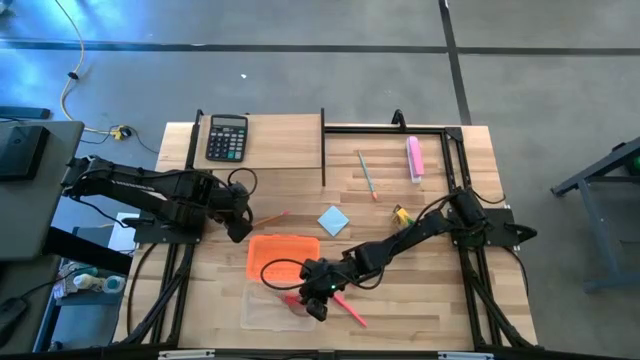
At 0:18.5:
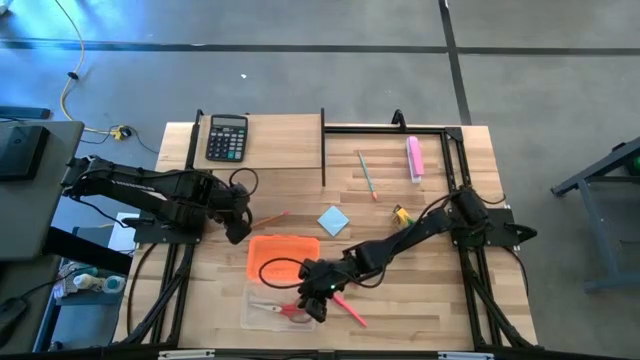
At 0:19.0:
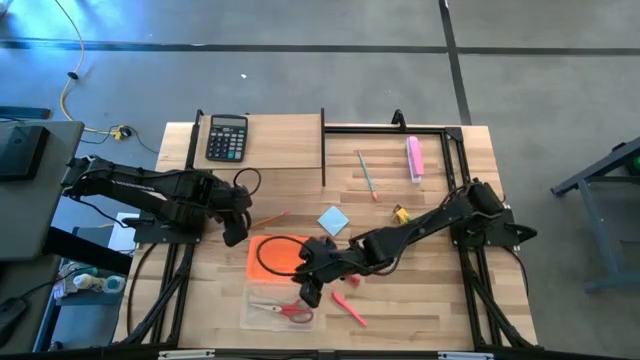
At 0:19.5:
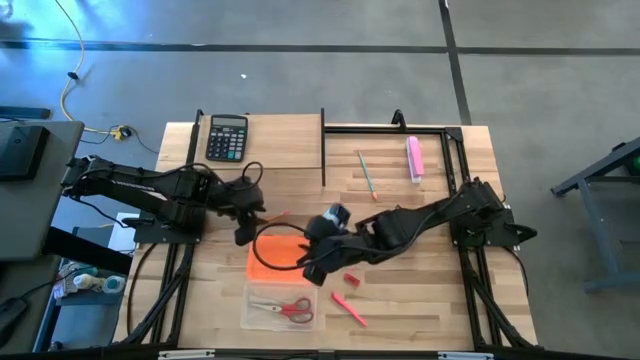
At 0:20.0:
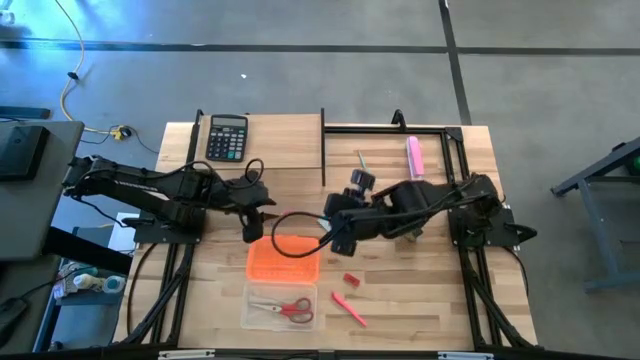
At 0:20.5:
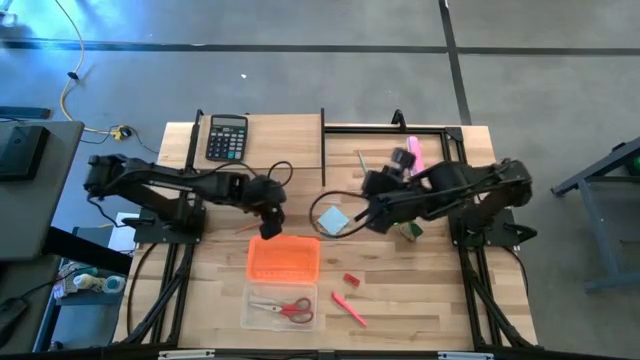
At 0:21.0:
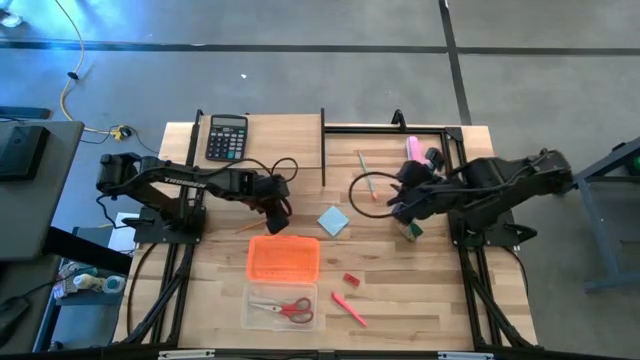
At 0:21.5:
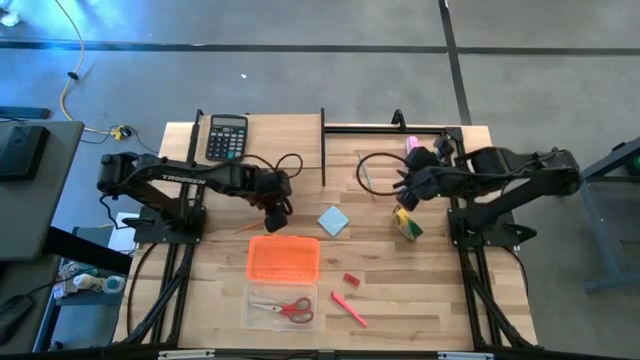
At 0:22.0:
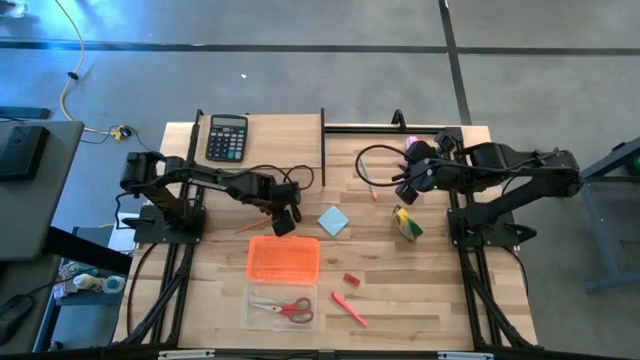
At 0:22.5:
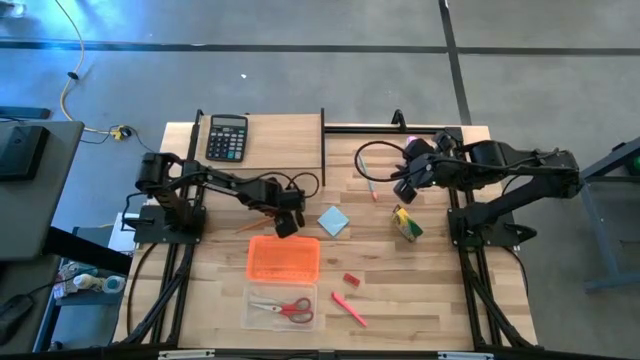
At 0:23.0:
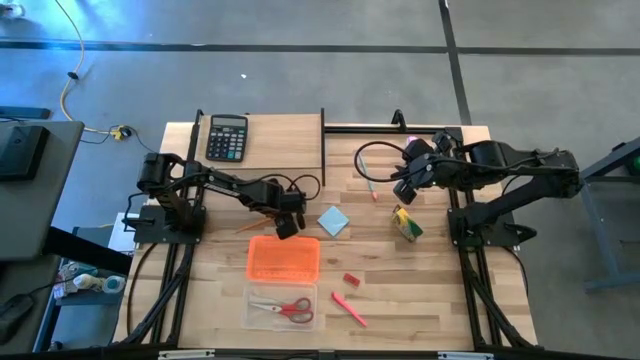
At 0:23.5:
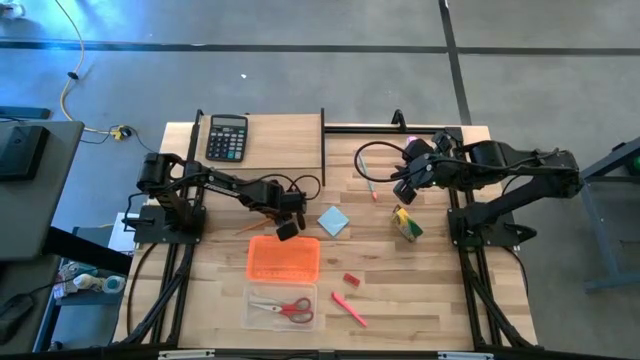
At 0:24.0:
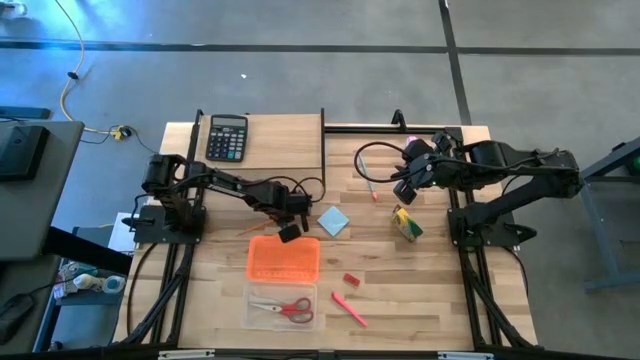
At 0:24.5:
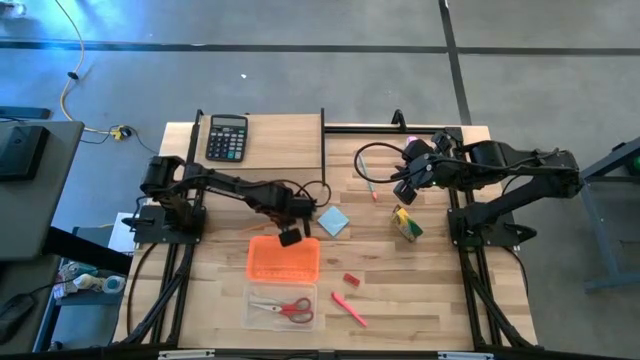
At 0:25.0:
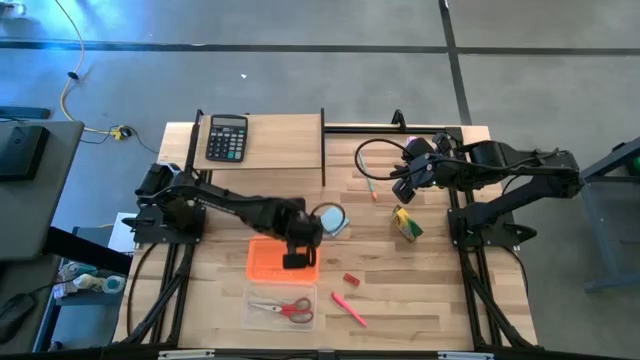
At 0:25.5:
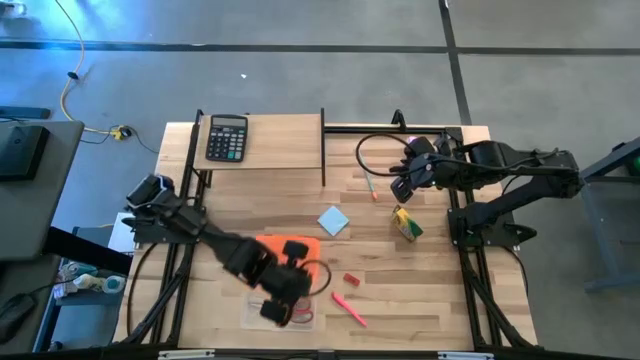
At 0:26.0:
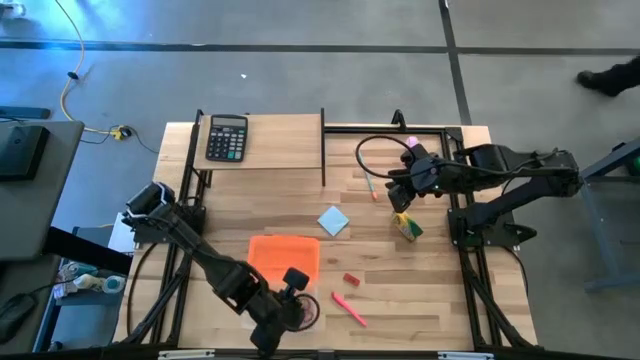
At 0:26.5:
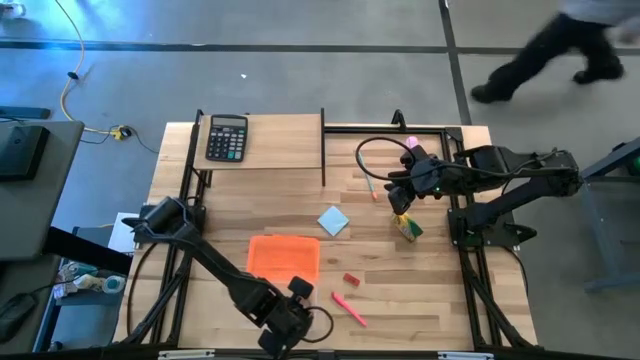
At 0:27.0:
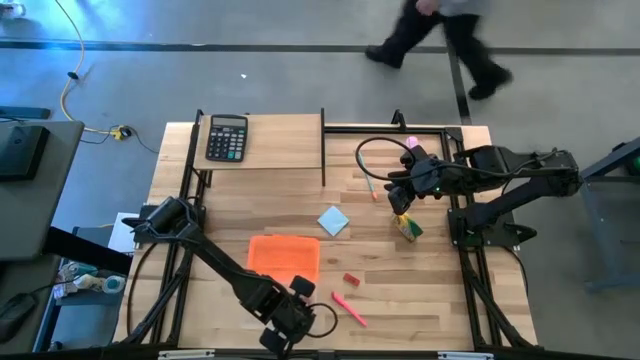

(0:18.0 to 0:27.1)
Task: Pack school essentials
Put the yellow pencil in the orange supply box

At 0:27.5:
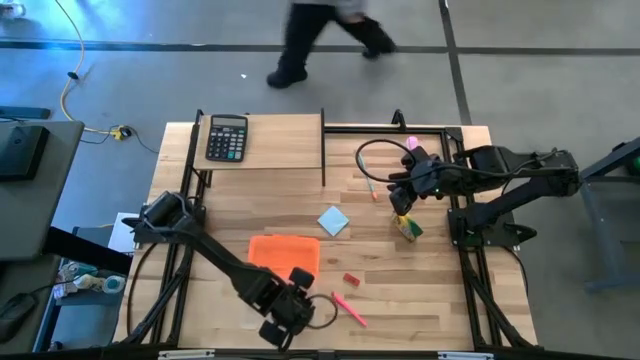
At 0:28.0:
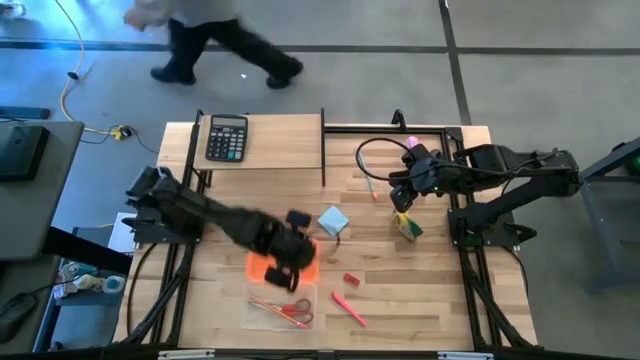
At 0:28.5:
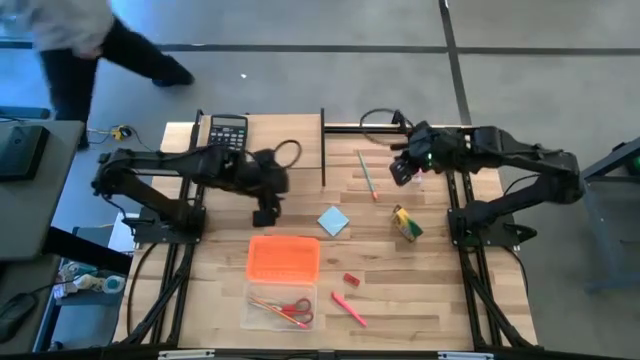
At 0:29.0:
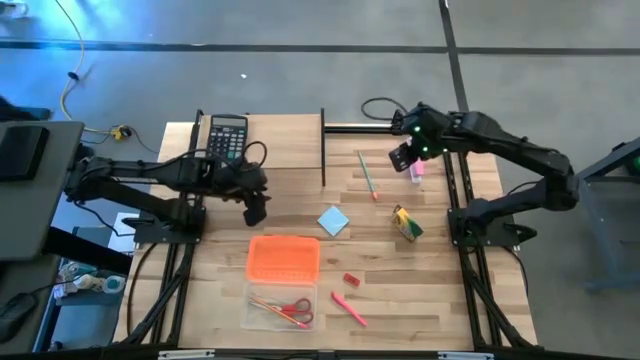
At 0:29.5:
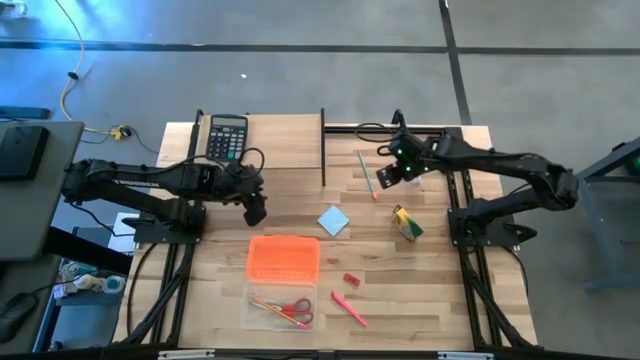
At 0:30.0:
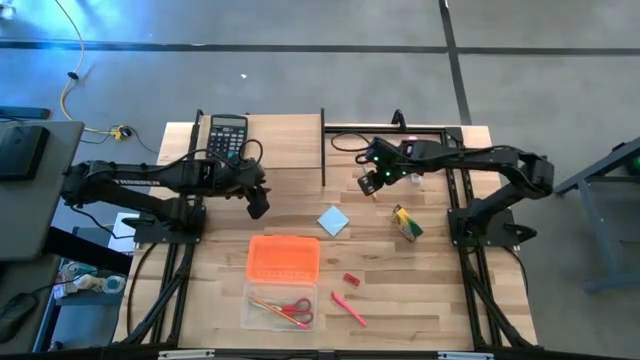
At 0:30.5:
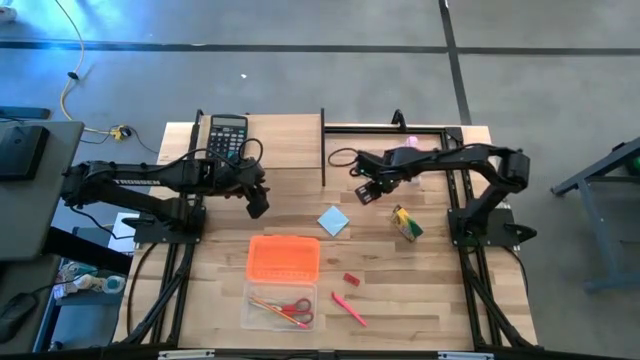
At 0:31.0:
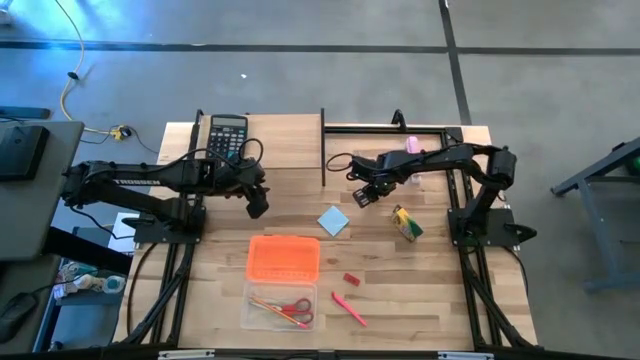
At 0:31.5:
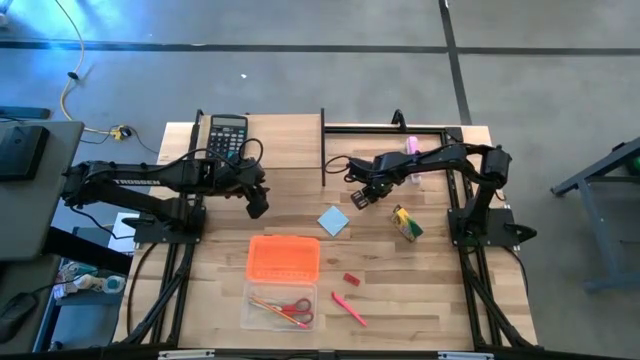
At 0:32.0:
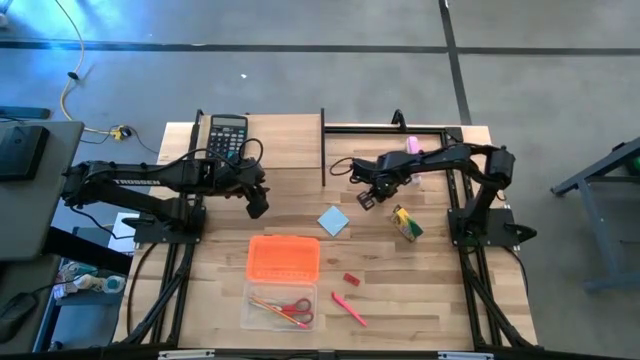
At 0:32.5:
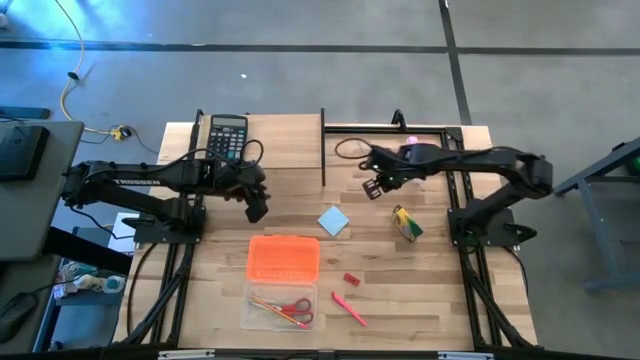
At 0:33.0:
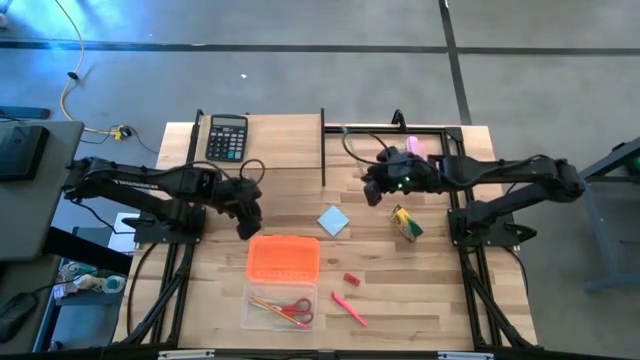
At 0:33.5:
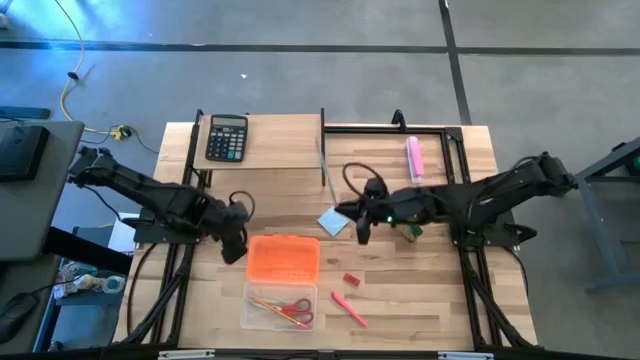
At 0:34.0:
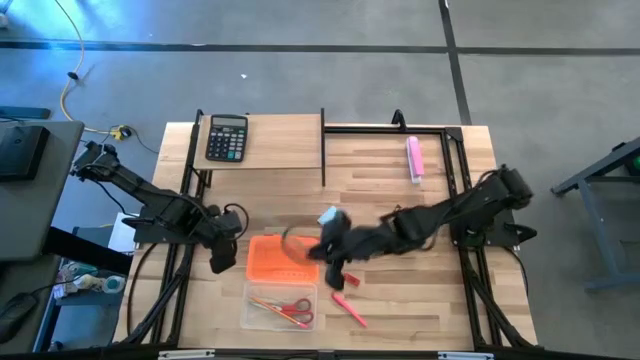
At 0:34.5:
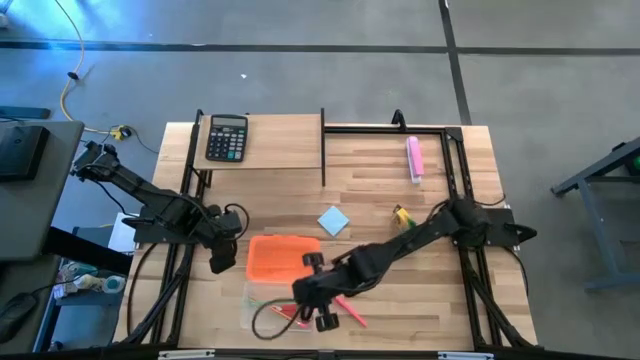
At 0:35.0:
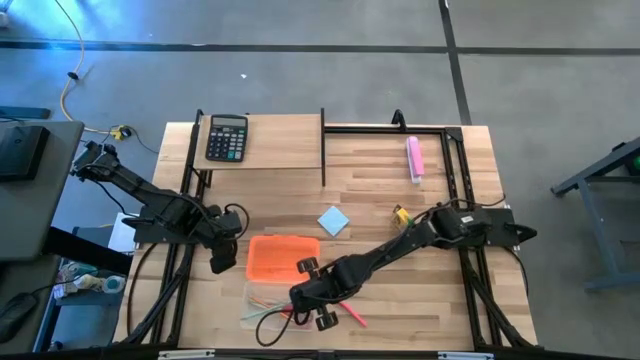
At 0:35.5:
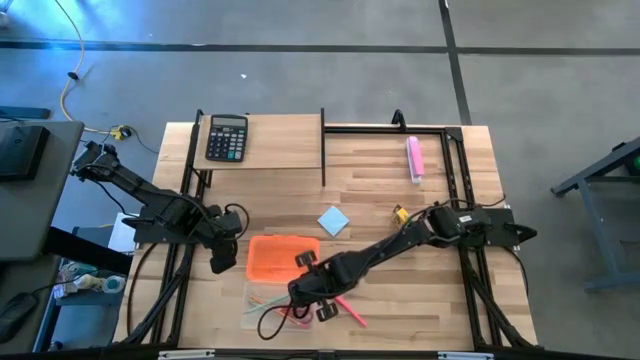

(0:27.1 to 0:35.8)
Put the blue pencil in the orange supply box

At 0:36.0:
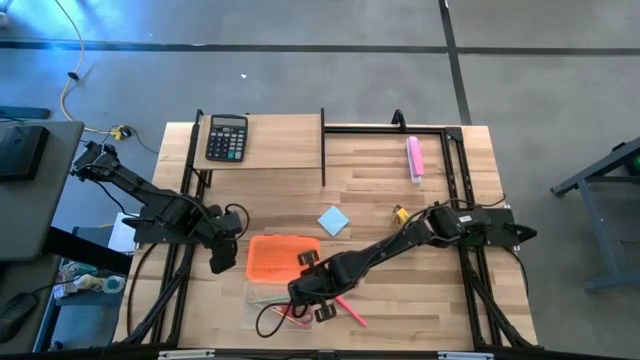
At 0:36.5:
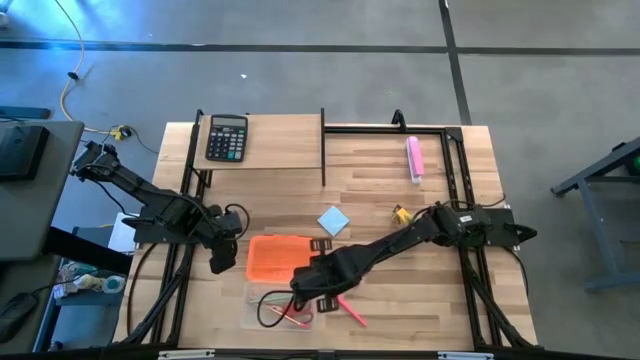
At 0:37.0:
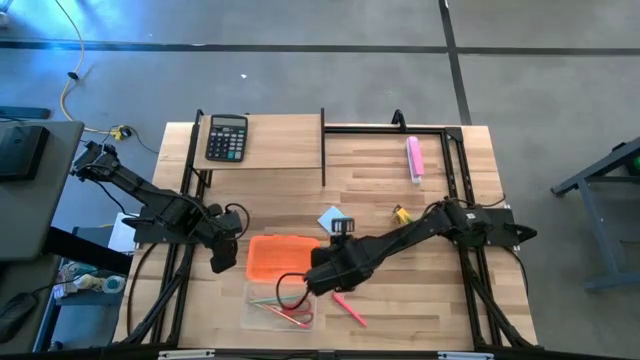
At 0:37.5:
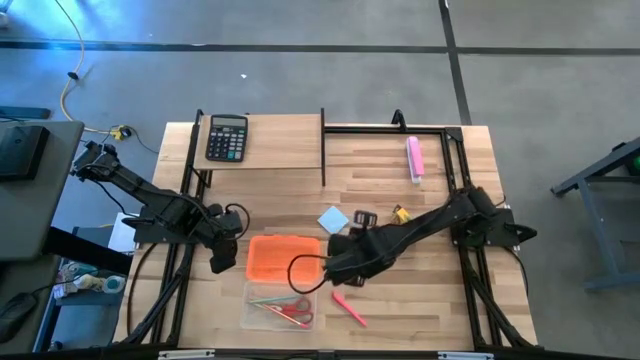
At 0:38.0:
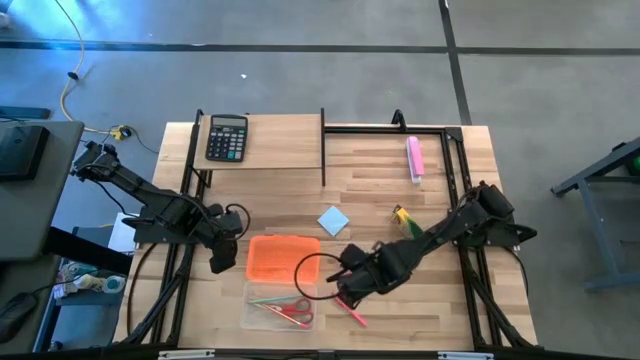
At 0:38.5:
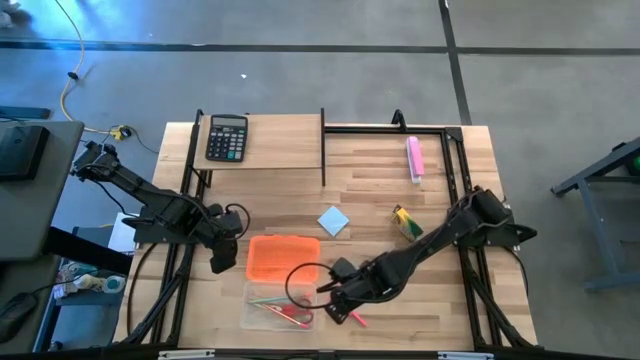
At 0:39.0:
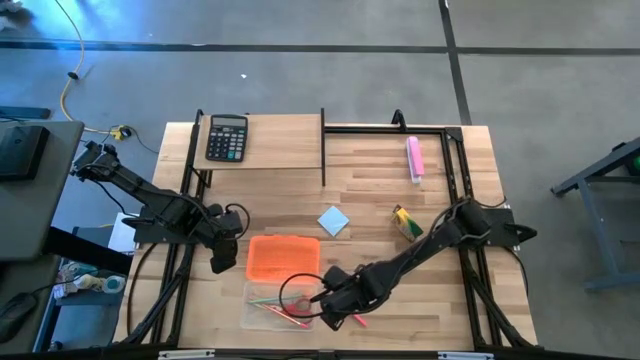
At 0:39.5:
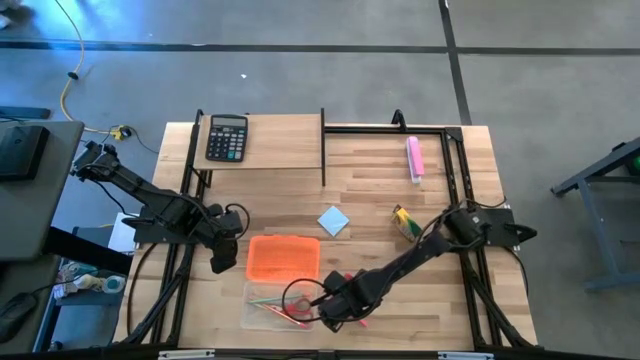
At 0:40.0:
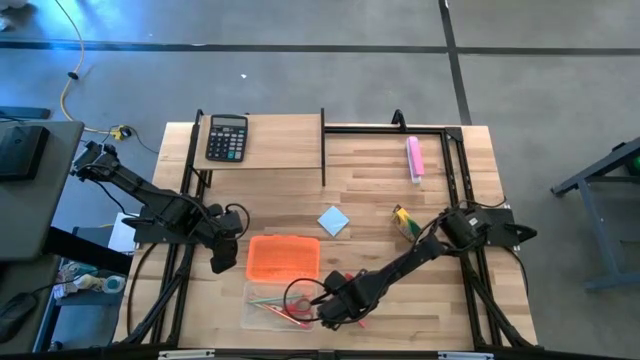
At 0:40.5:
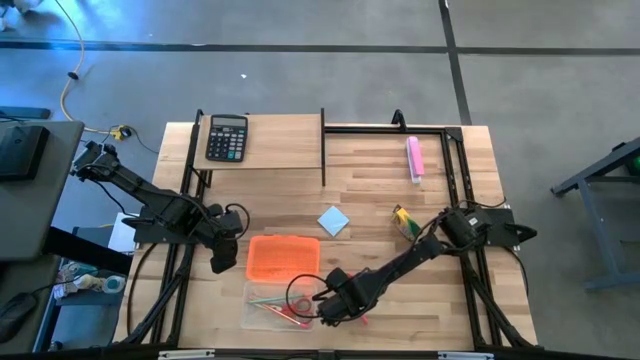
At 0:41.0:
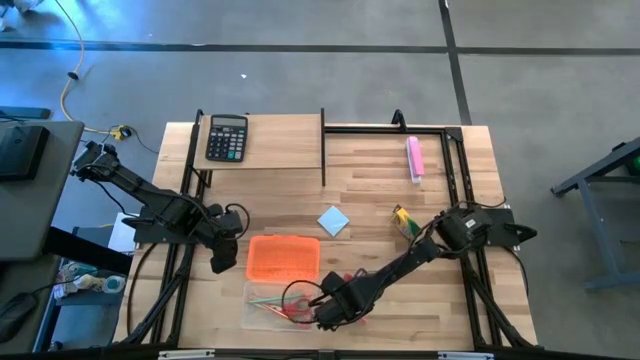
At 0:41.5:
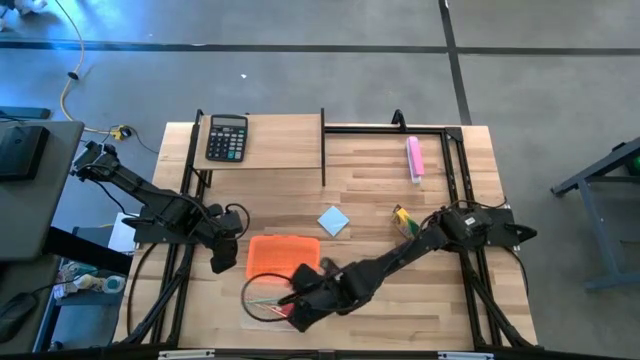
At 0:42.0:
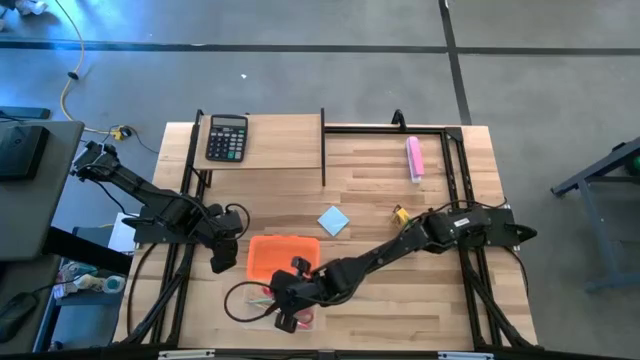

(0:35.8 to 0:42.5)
Put the pink pen in the orange supply box
